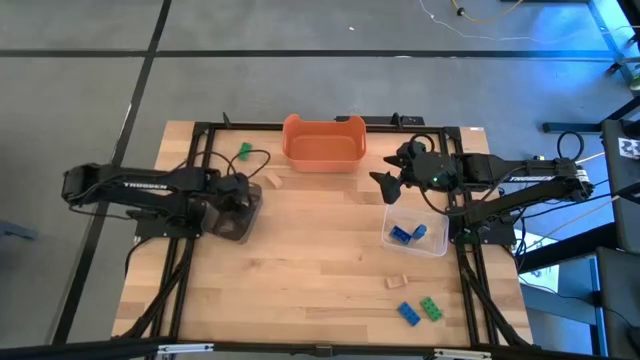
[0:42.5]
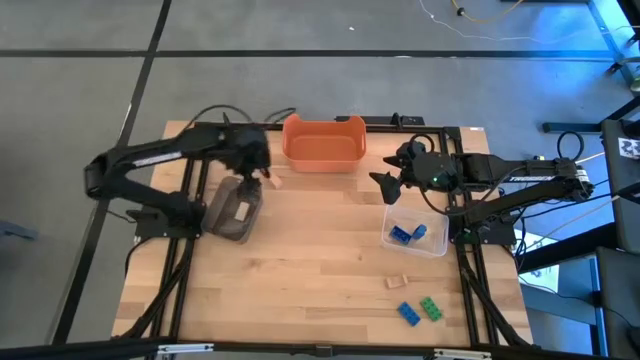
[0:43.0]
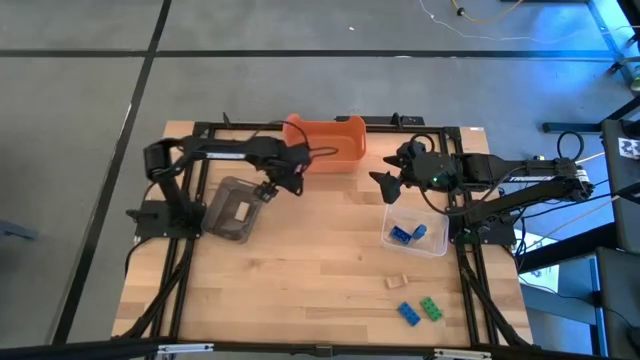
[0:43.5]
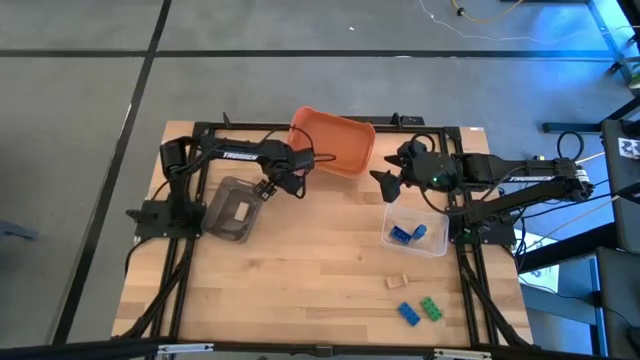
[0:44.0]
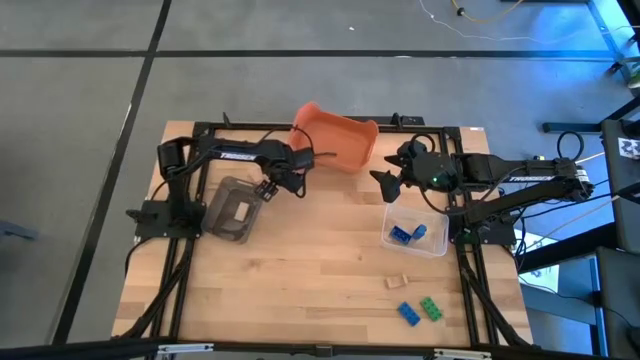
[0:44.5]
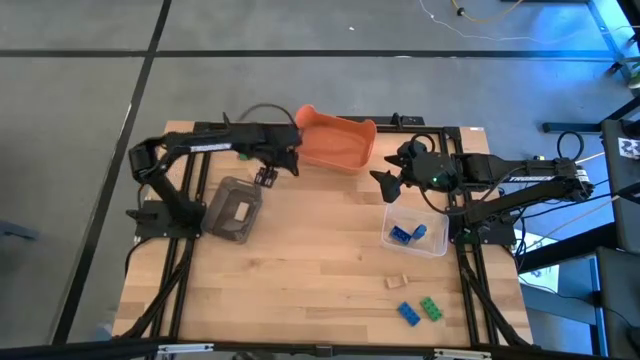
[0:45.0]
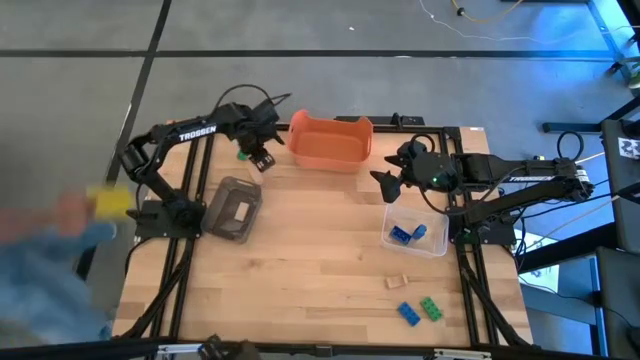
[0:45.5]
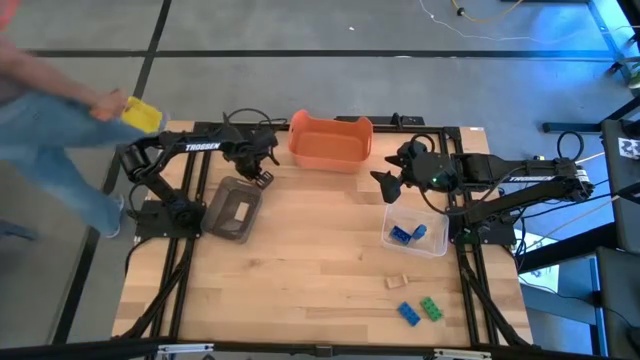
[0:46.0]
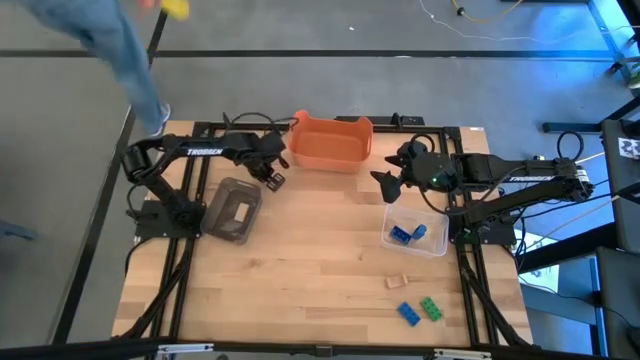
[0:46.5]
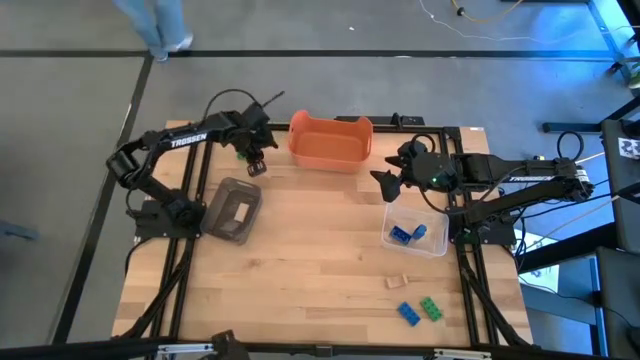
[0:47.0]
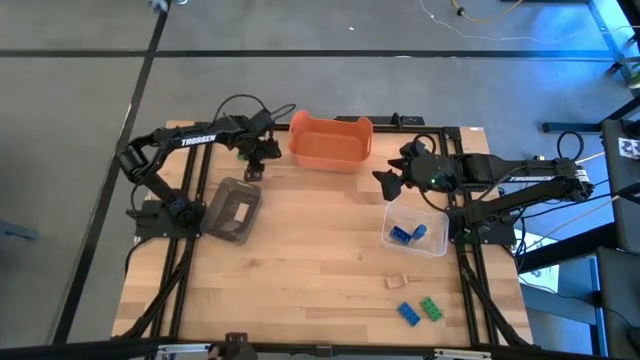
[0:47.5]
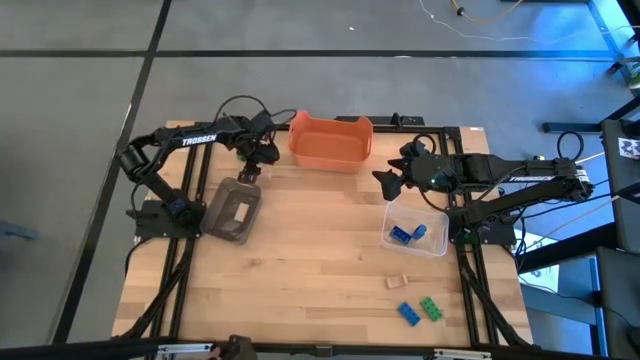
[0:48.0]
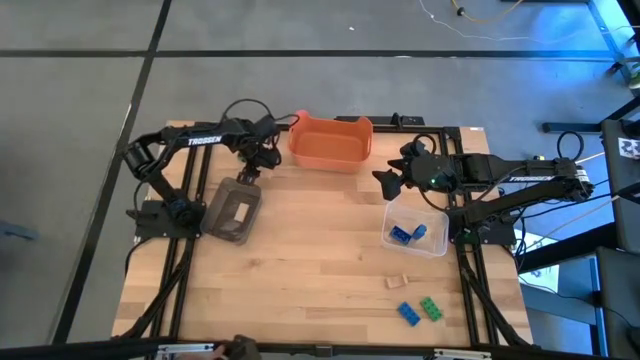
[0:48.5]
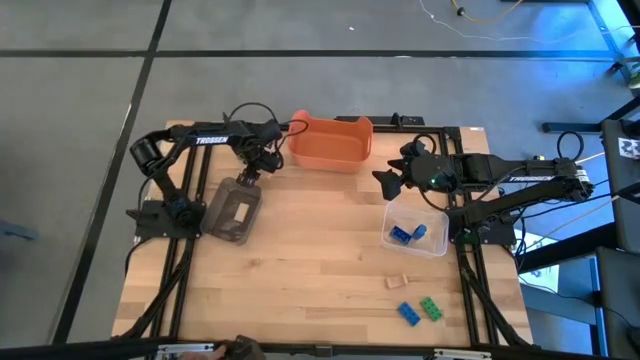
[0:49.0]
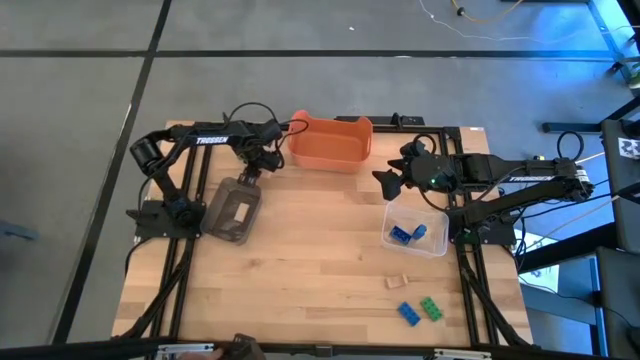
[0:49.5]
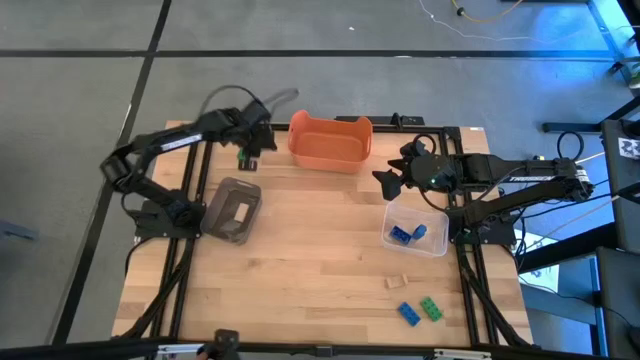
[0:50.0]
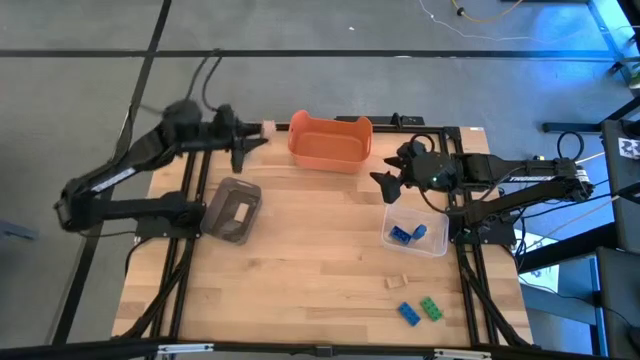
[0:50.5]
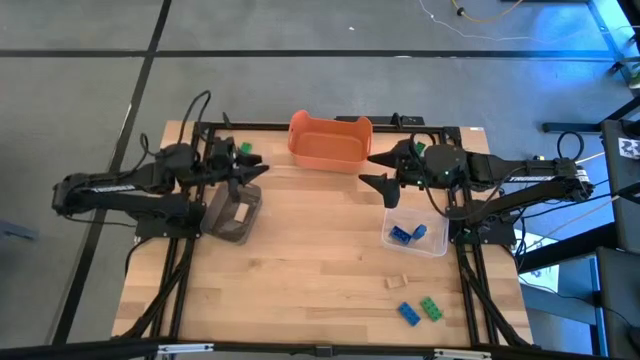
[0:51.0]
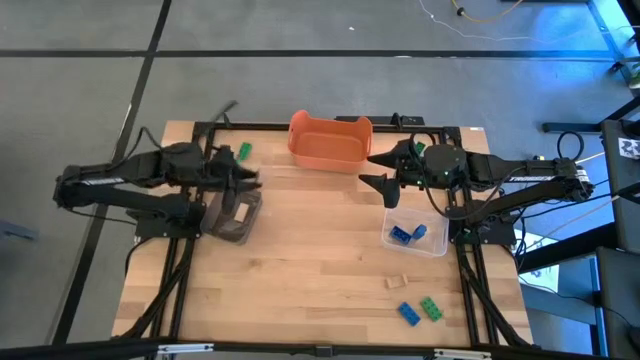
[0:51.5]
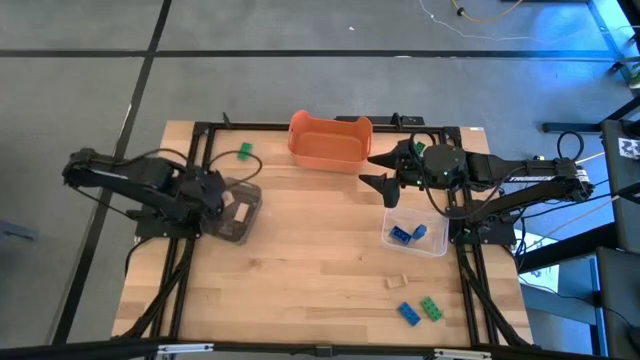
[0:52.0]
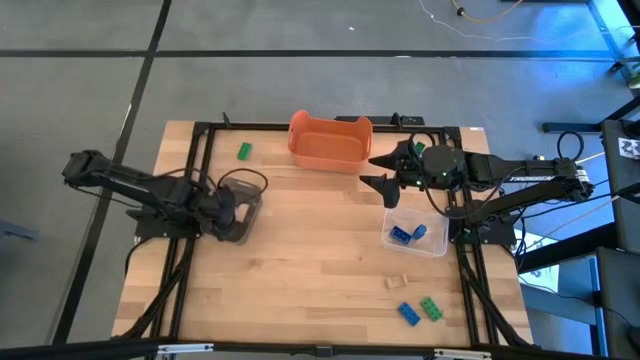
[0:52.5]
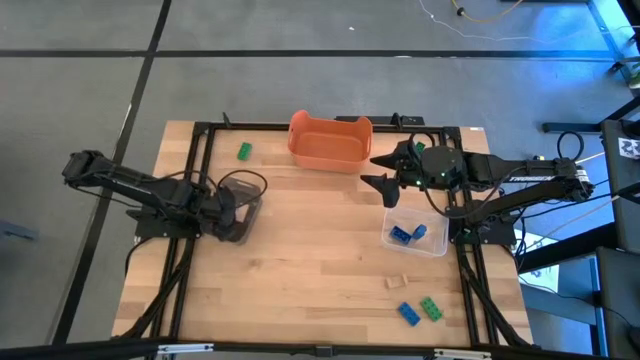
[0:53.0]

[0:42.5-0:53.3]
Task: Sort & place blocks by color
Put the top brown block into the black bin

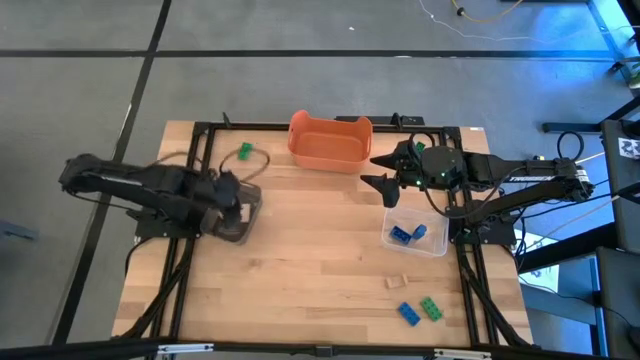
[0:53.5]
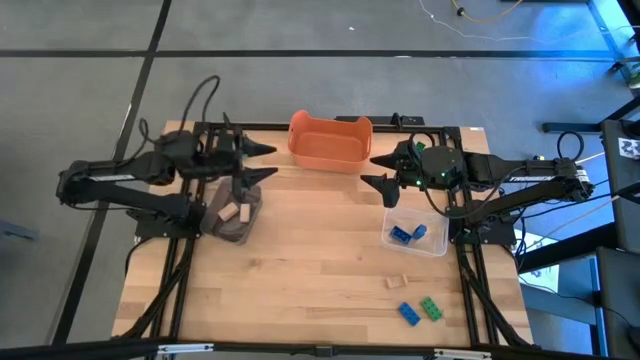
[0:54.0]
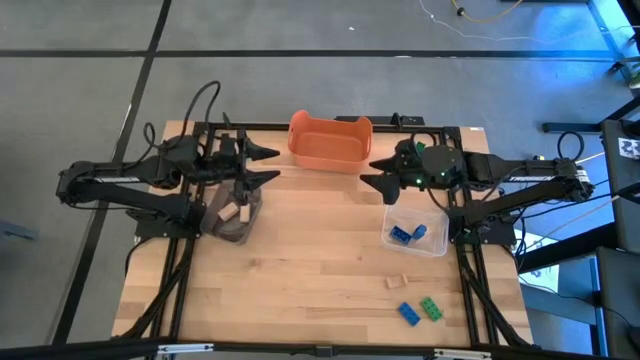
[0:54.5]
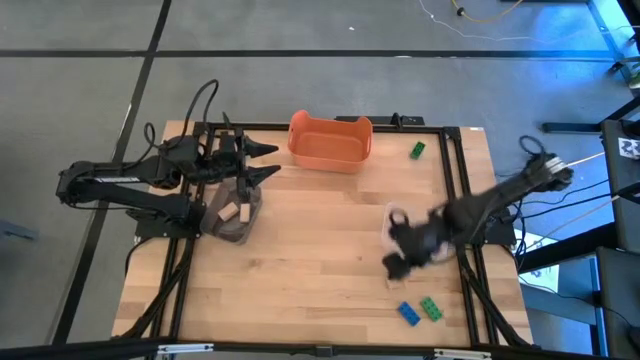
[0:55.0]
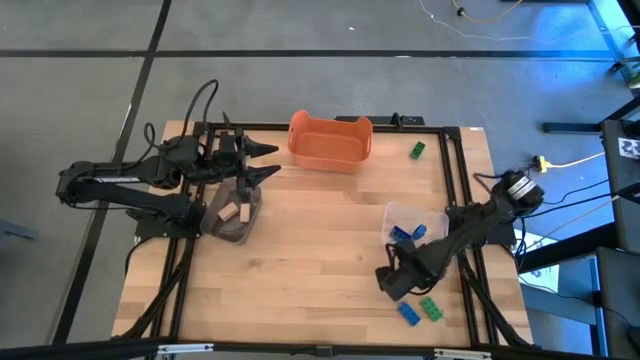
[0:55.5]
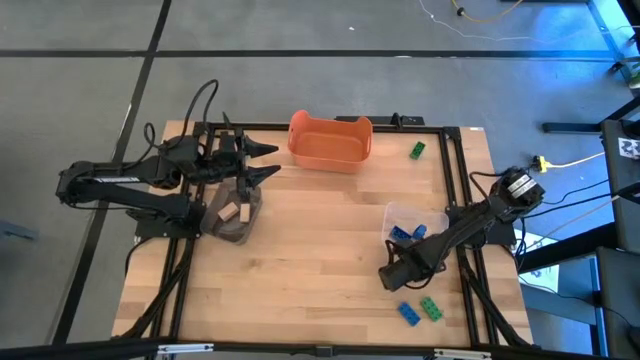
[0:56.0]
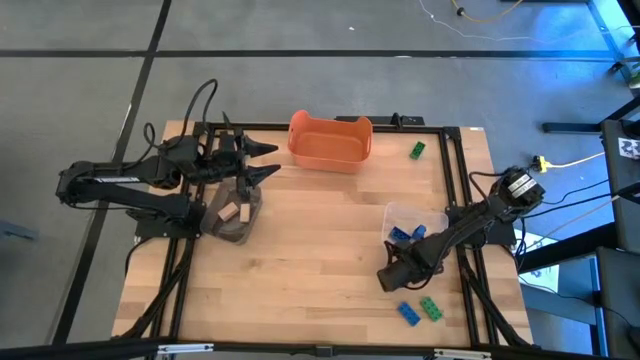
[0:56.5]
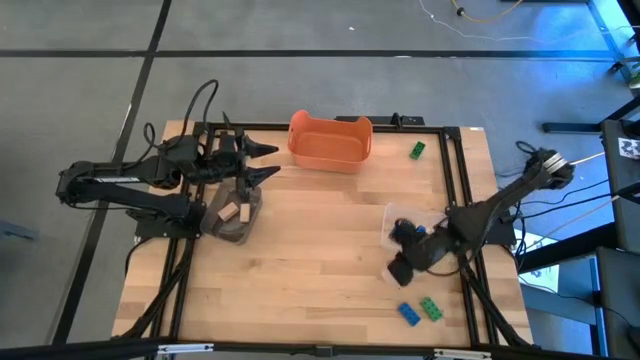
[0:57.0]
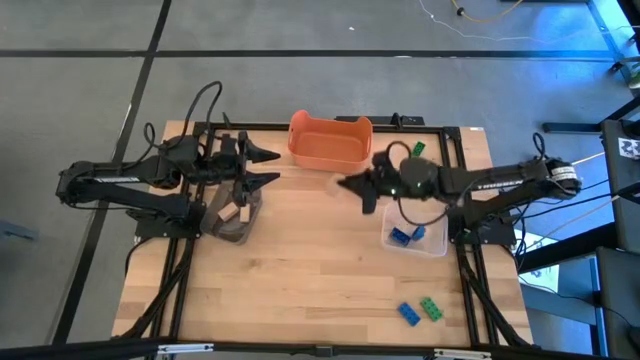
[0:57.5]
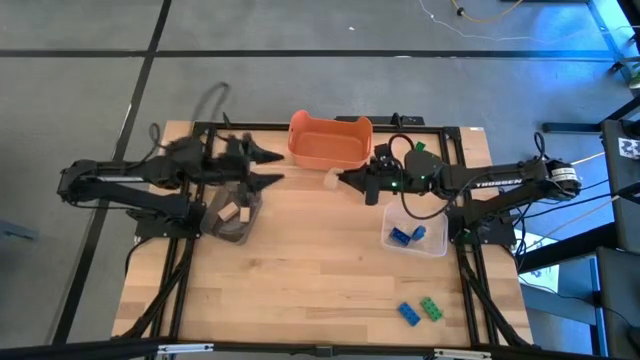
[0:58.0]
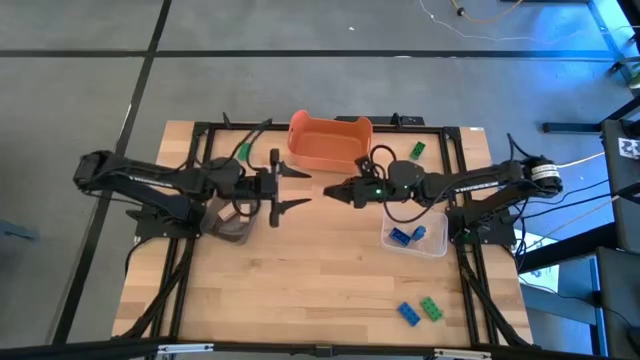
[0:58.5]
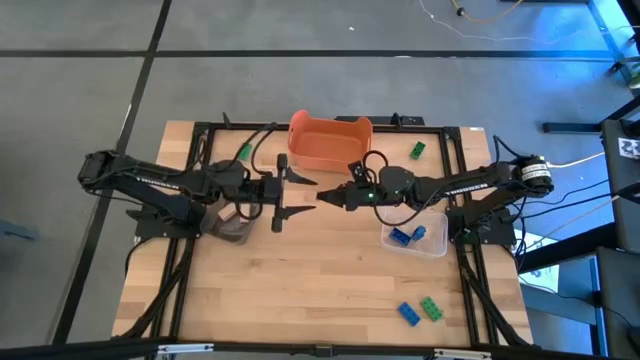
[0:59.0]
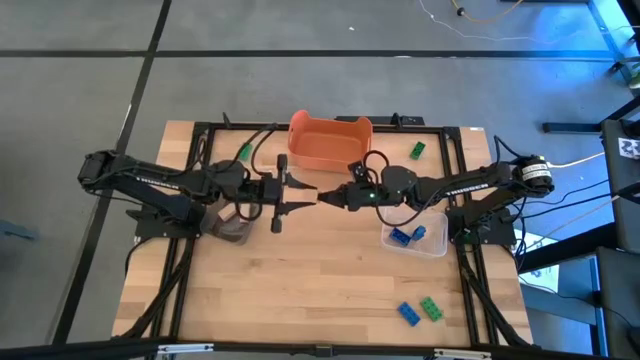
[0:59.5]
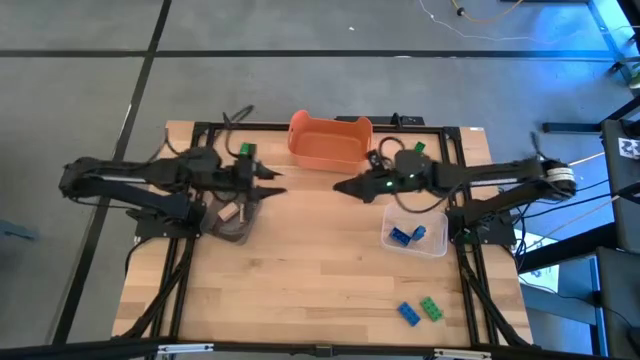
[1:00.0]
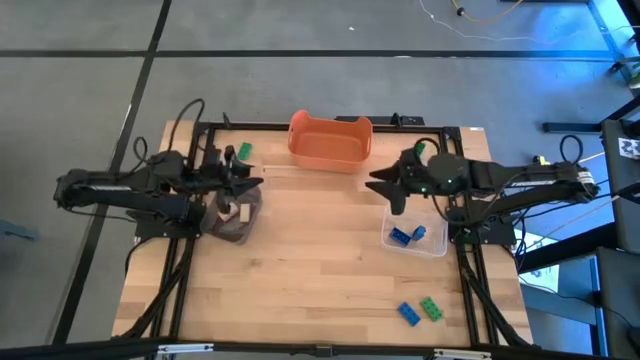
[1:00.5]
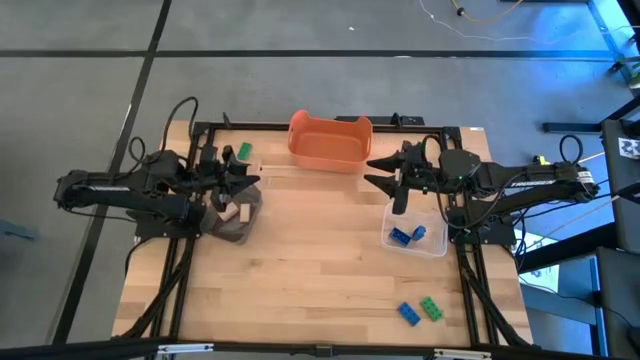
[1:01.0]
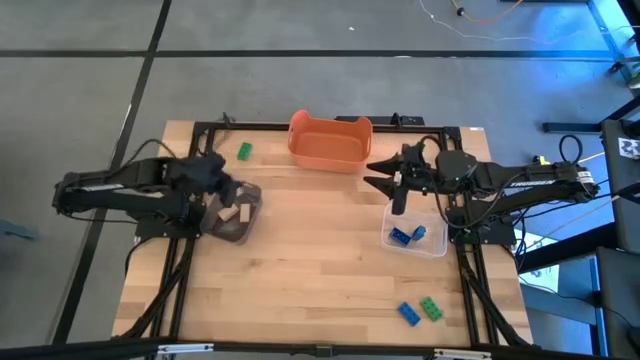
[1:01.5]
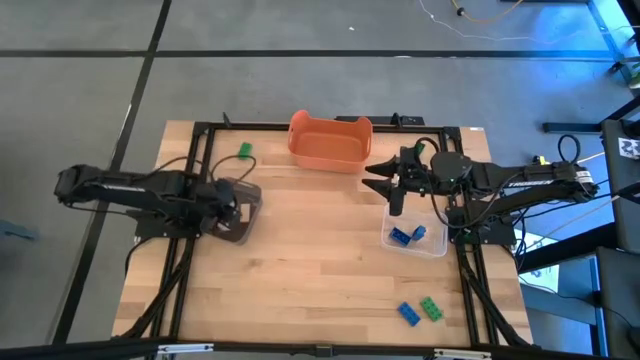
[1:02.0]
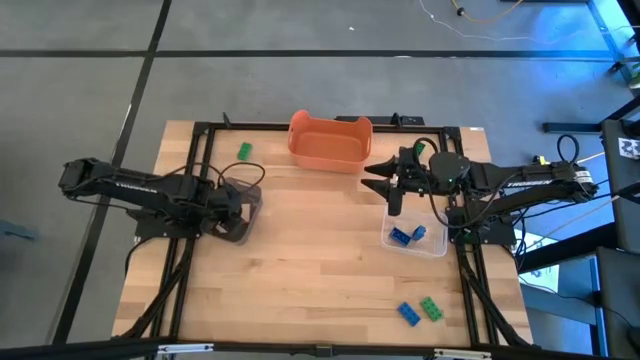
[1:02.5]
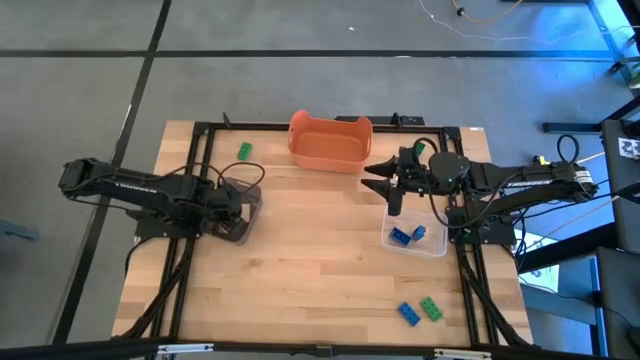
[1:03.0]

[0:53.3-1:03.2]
Put the brown block into the black bin

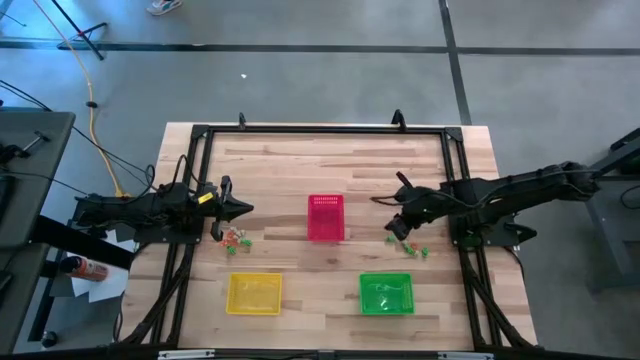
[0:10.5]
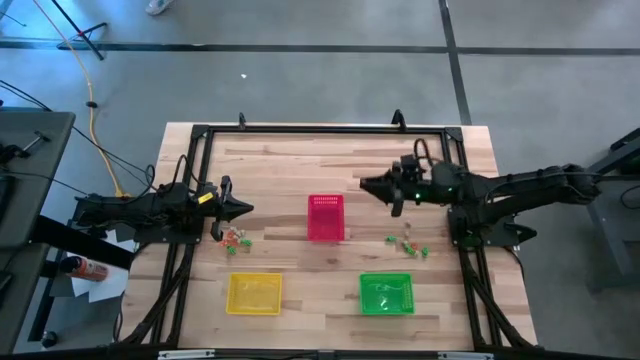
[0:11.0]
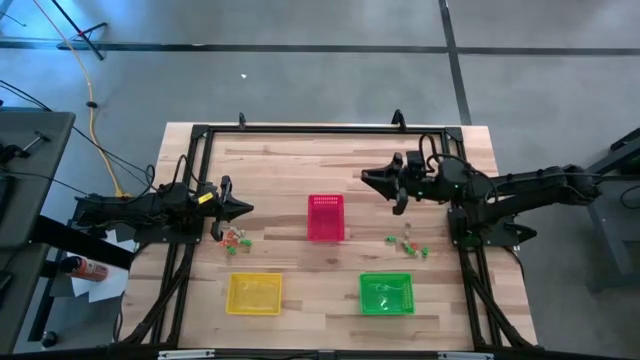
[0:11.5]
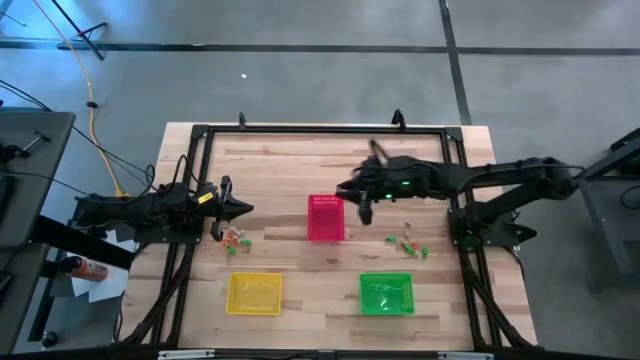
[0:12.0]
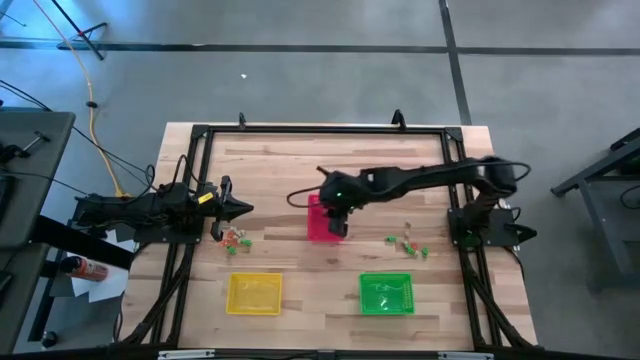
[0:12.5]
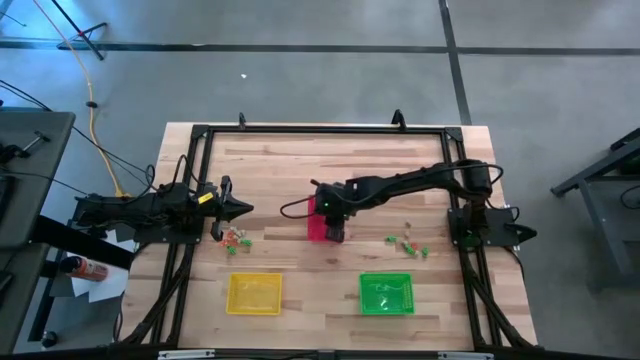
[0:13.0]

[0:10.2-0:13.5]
Task: Sort Halloween decoration
Put the orange pumpkin toy into the red bin
